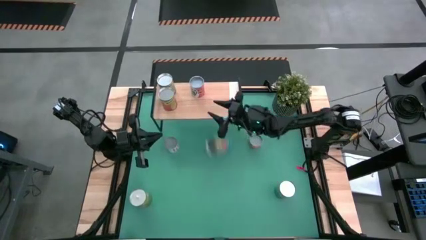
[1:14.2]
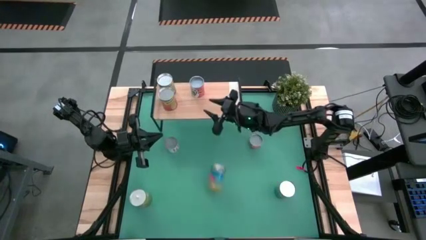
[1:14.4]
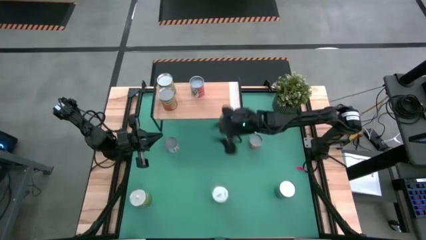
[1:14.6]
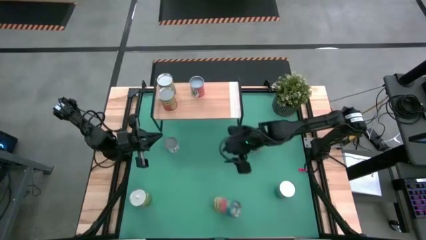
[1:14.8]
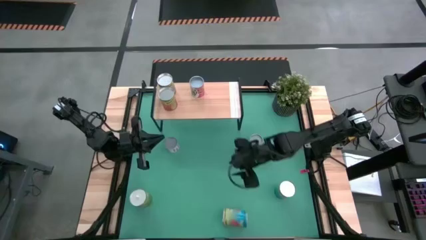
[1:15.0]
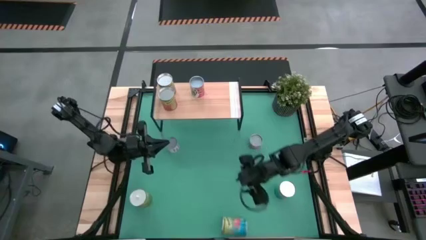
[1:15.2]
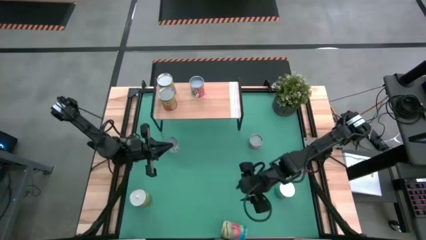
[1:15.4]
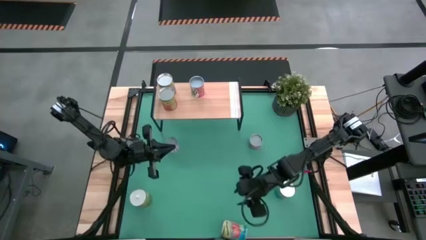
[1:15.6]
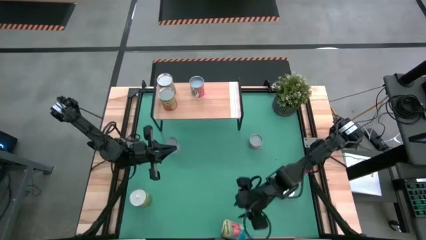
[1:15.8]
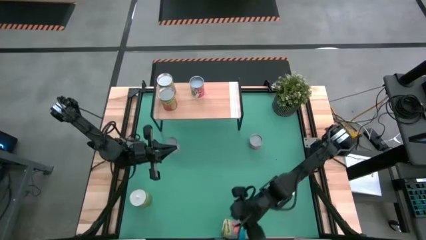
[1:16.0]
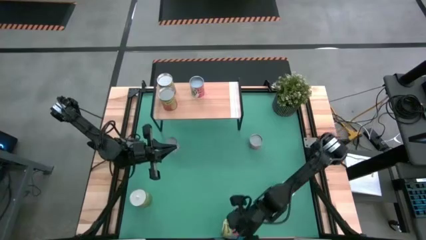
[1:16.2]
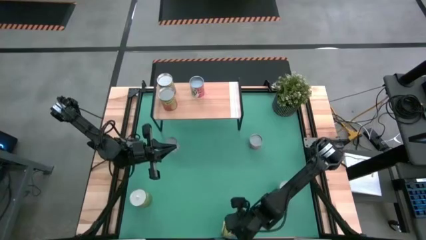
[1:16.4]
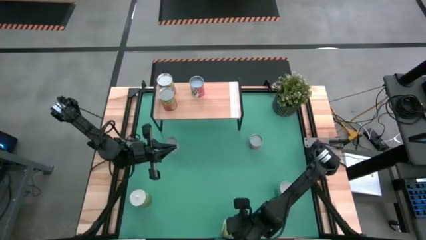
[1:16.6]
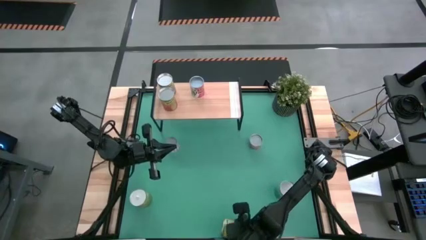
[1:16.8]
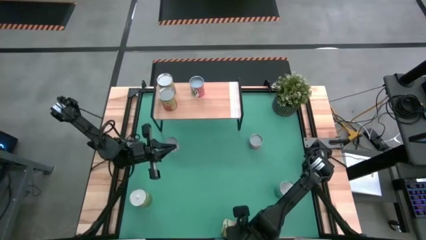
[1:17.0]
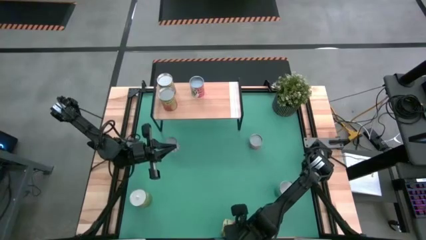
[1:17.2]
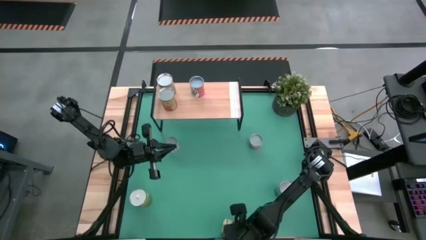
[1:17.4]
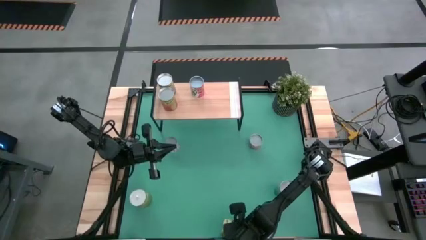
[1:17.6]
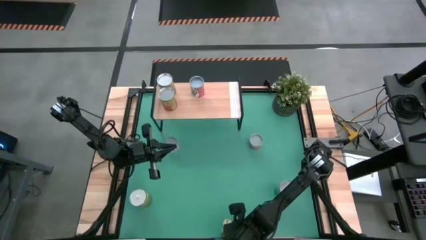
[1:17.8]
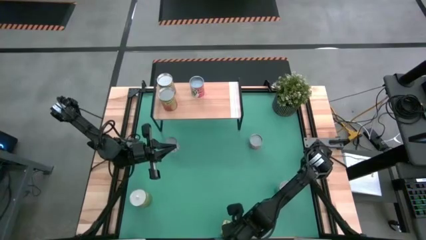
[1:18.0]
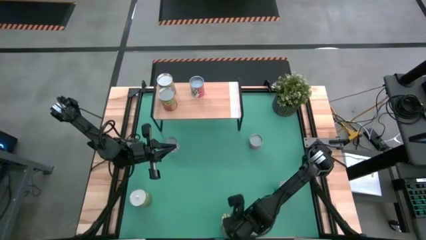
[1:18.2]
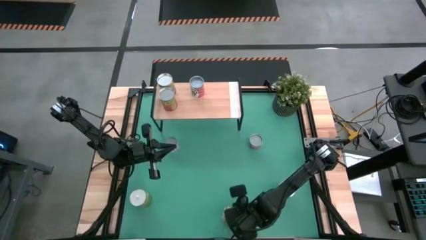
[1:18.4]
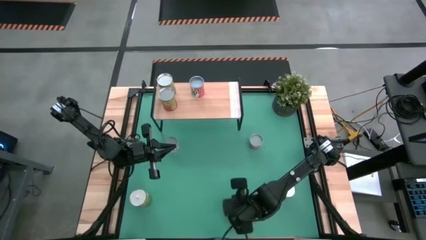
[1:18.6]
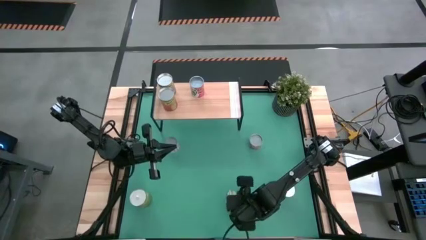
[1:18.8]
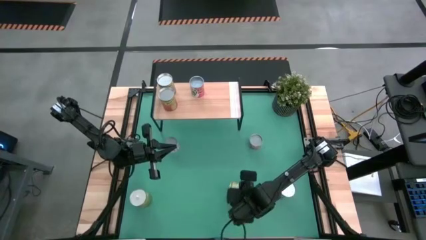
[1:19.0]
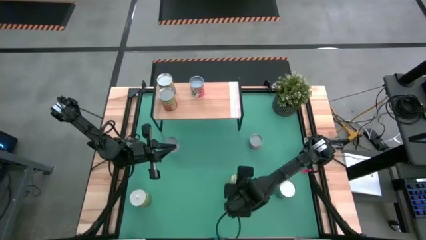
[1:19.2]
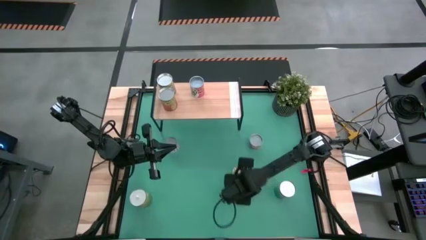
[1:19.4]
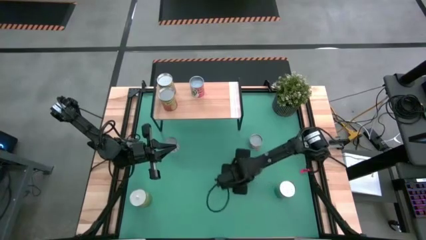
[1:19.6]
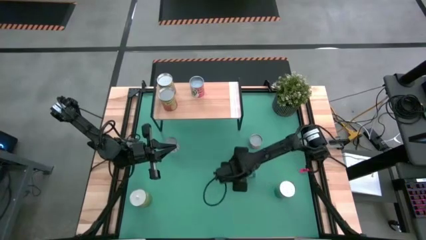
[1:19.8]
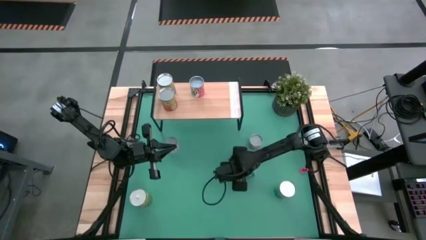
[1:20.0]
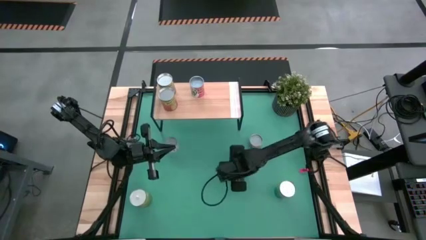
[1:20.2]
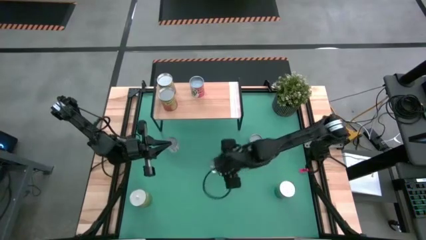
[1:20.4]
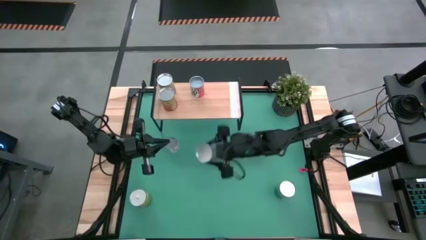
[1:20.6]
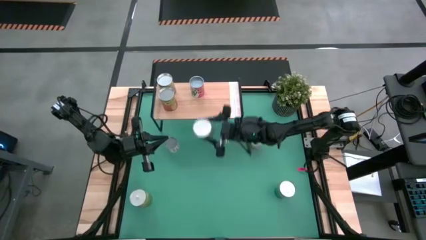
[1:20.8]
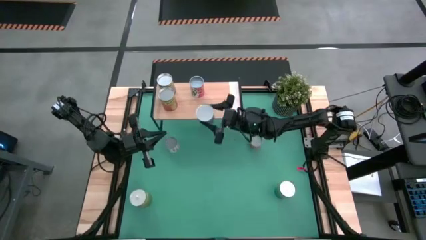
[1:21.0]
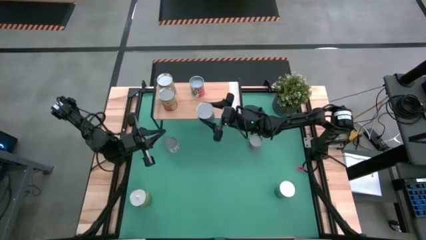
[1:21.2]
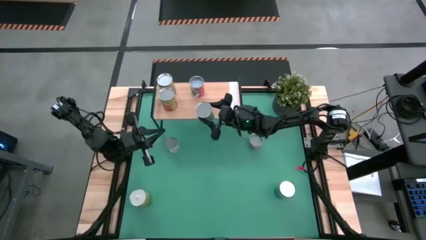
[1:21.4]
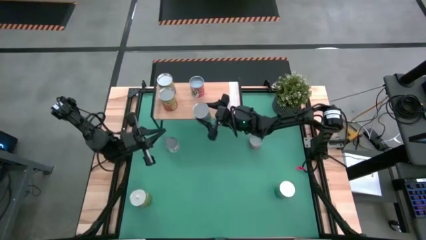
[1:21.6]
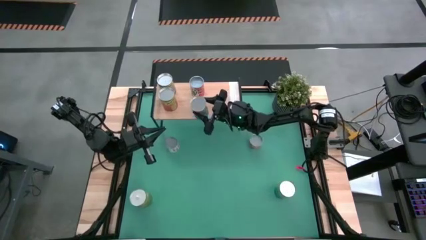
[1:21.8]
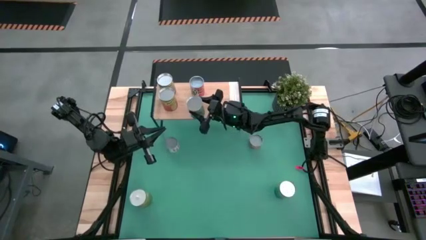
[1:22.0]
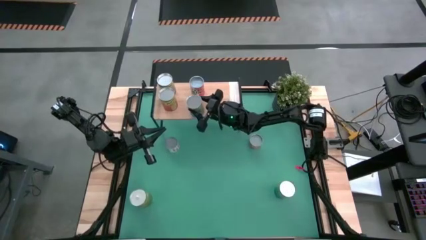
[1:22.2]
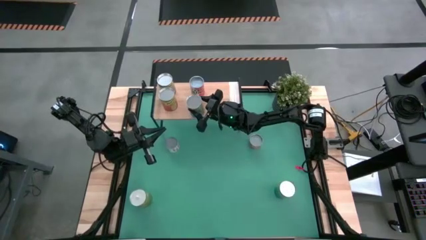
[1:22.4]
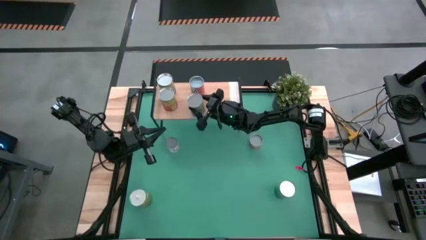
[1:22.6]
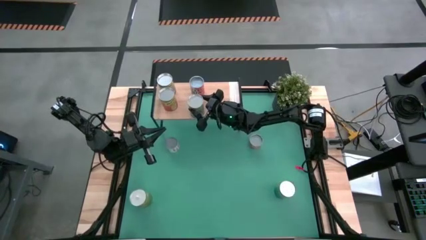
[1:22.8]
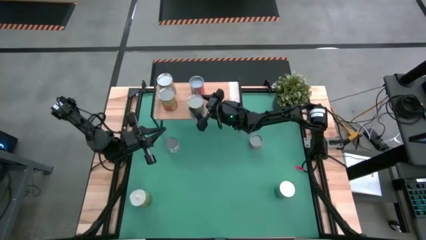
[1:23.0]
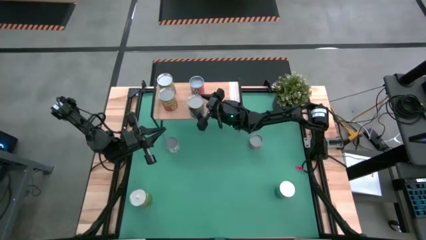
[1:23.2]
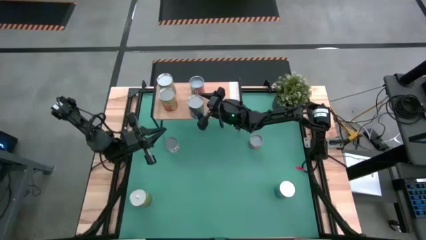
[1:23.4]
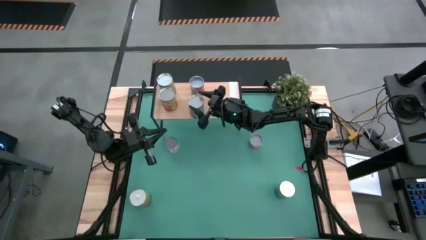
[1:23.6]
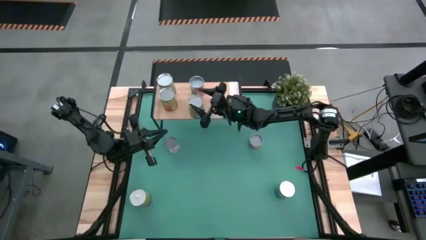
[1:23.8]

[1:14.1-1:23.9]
Task: Pick and place cans onto a shelf
Put the canned tomatoes on the shelf

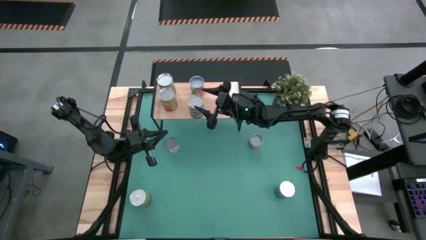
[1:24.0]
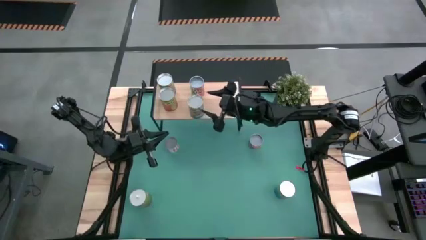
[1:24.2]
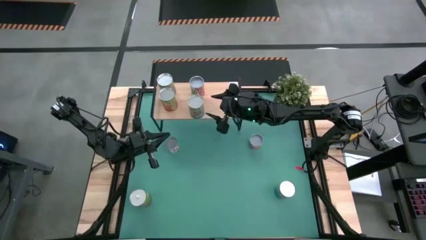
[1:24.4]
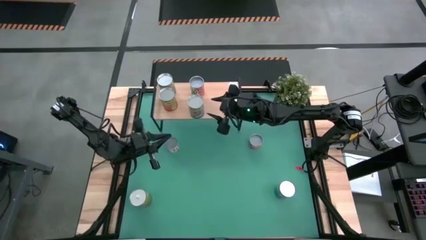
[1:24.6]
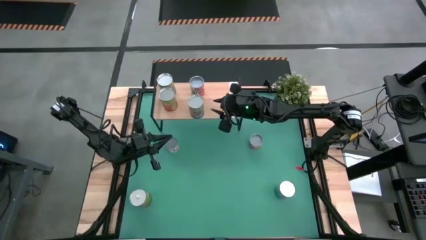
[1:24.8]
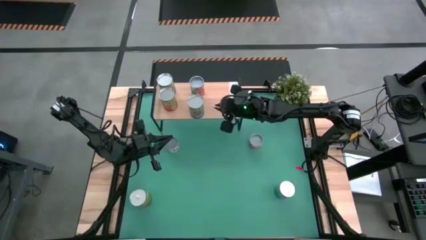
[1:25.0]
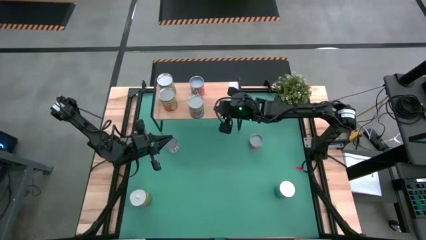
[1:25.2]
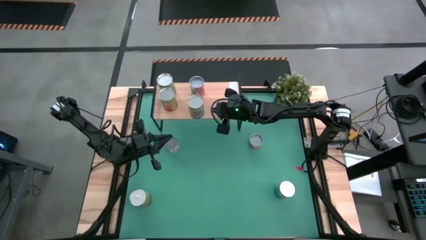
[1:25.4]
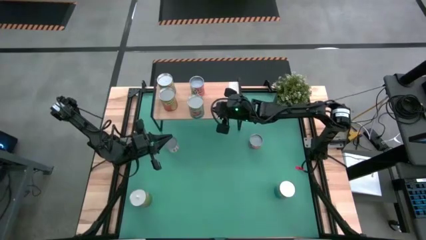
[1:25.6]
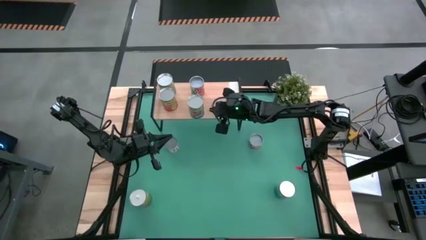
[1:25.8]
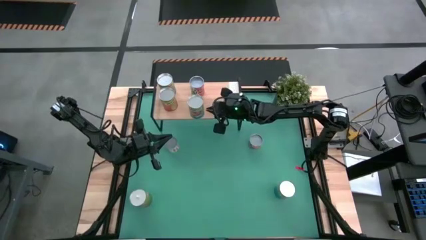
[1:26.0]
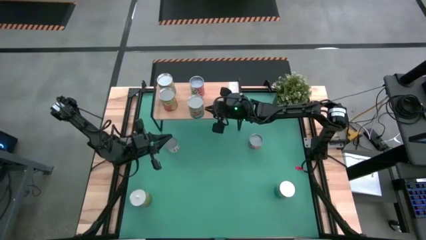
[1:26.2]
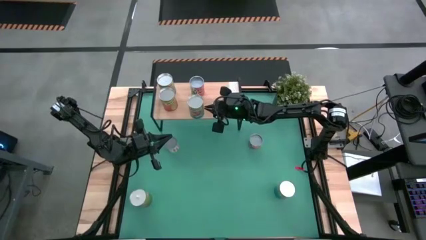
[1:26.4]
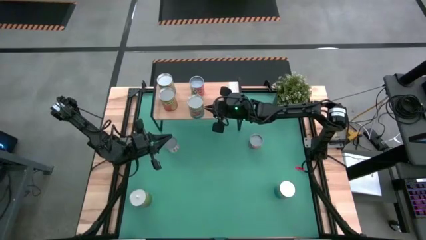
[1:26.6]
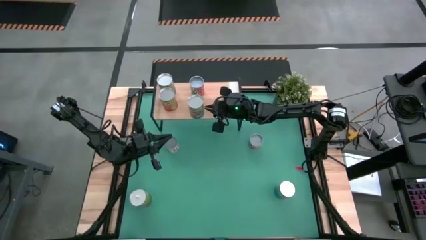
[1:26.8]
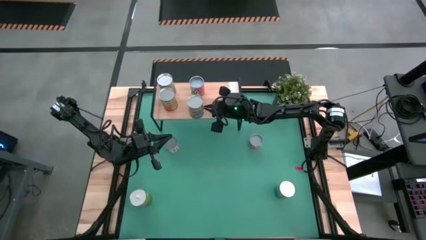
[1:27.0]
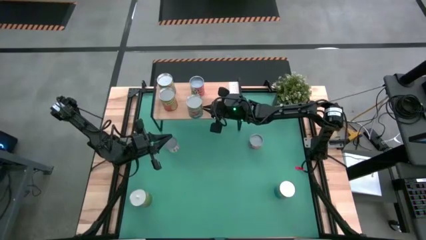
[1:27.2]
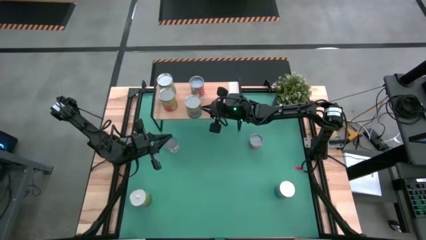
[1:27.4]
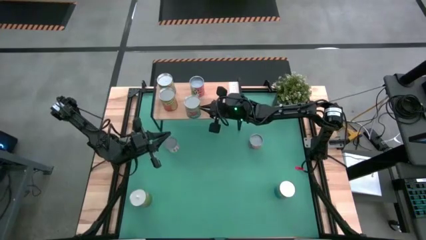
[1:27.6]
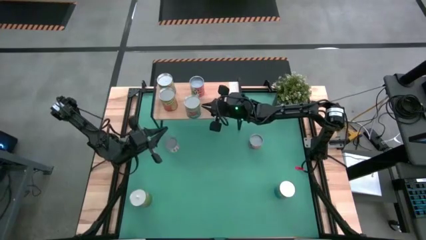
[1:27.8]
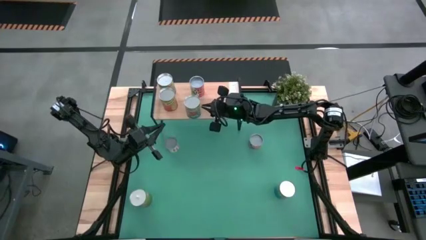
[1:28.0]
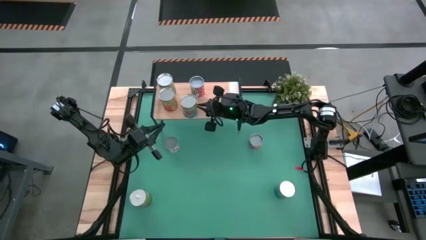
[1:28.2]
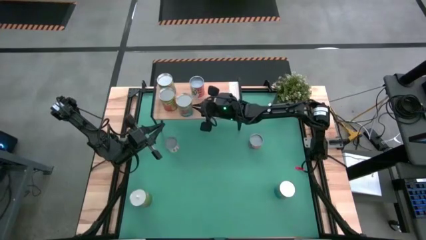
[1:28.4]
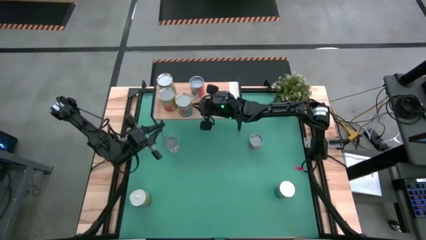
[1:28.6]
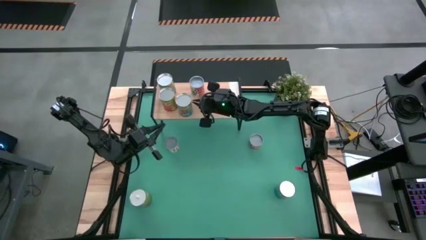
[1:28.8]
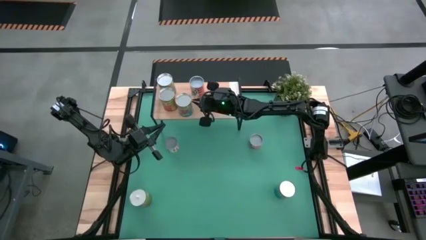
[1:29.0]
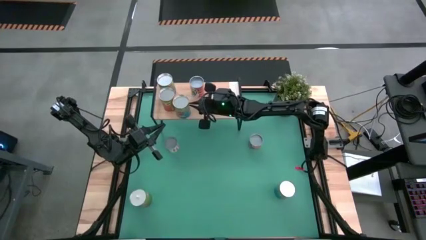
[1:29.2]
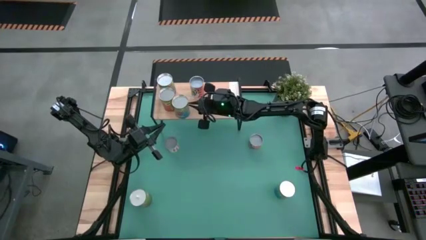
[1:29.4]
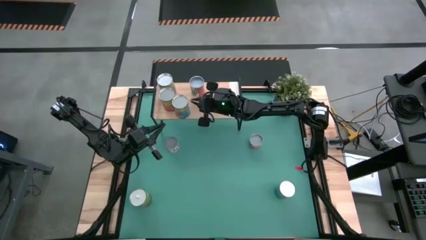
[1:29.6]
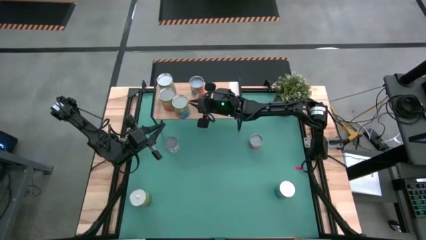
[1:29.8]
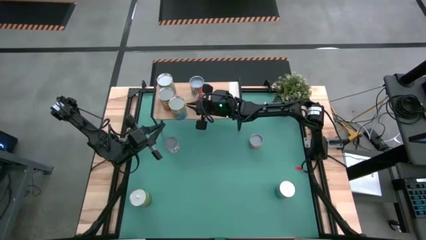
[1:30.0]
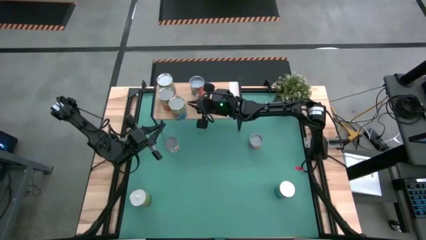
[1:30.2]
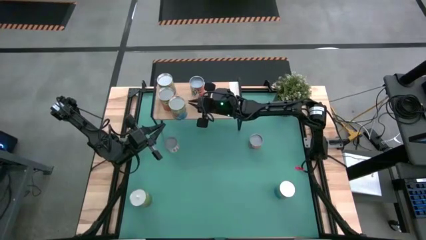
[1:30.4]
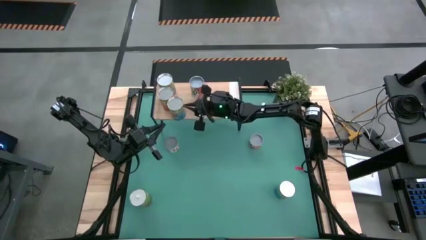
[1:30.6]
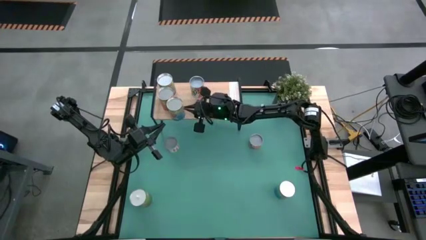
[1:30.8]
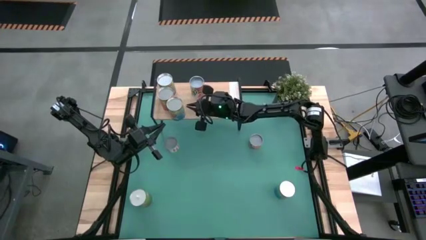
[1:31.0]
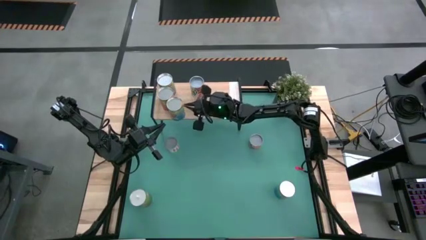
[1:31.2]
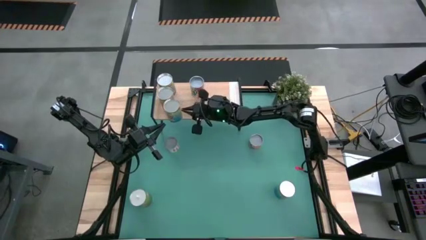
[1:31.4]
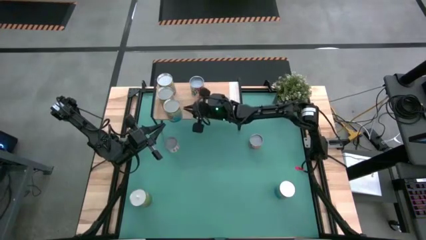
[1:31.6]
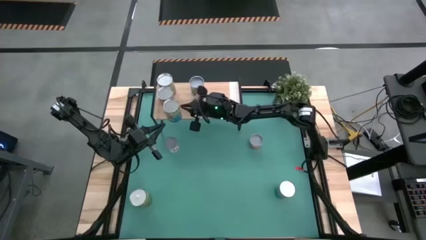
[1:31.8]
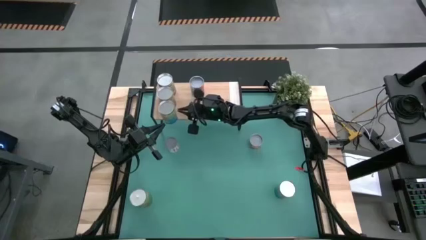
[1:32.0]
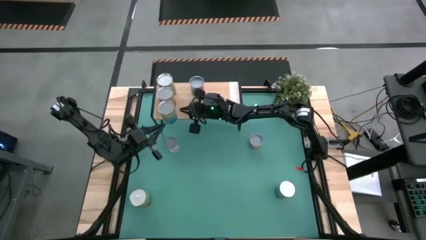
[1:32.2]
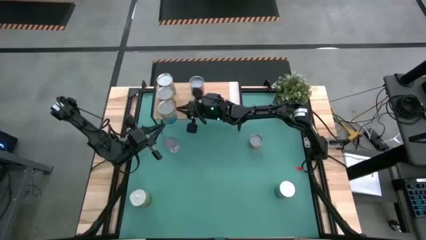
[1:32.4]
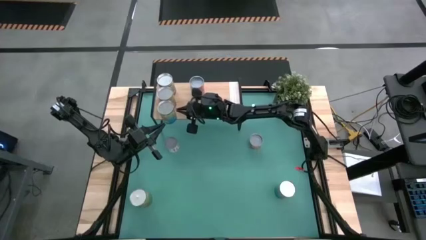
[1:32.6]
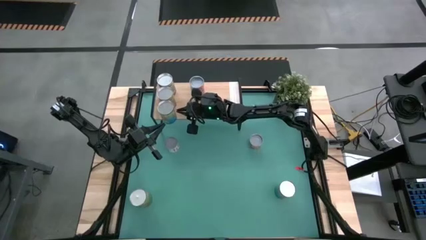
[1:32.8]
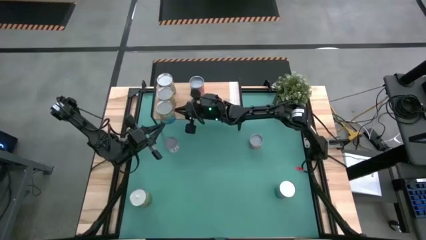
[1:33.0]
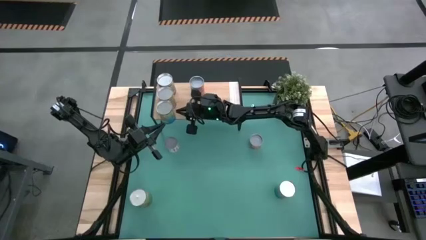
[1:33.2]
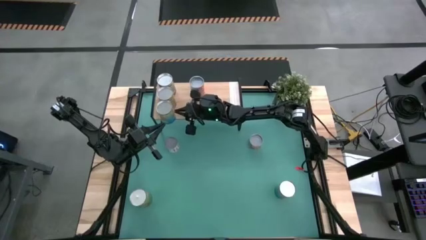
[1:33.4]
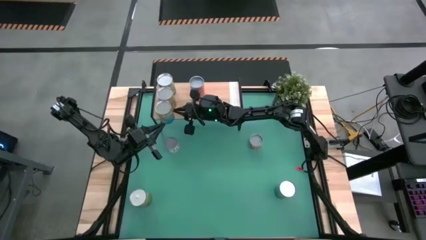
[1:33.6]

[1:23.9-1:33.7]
Put the canned tomatoes on the shelf
